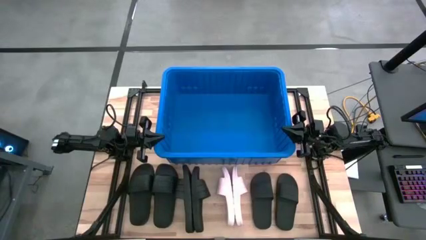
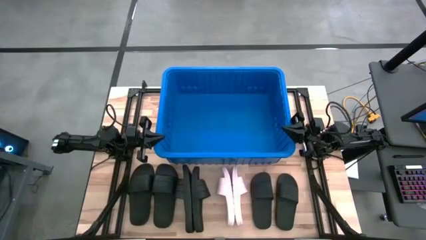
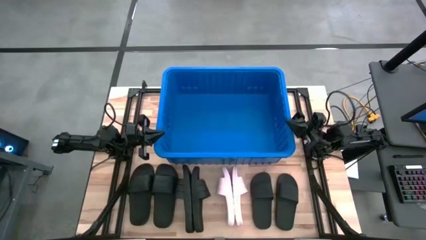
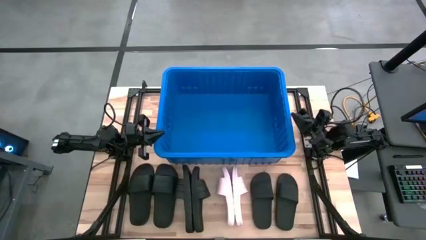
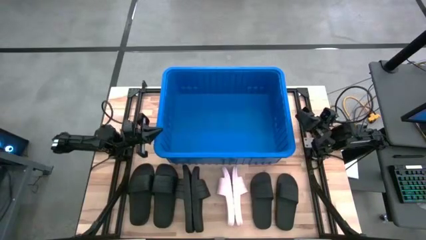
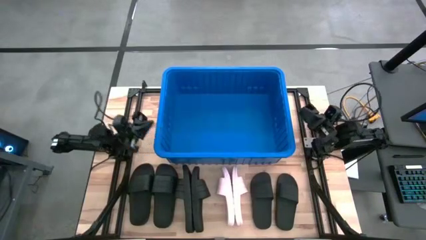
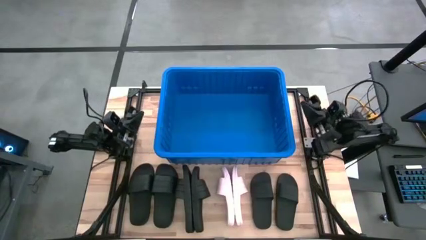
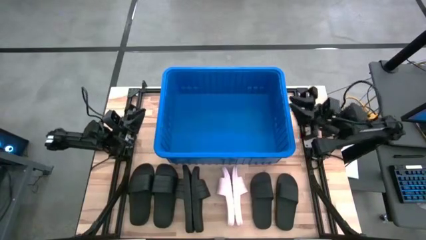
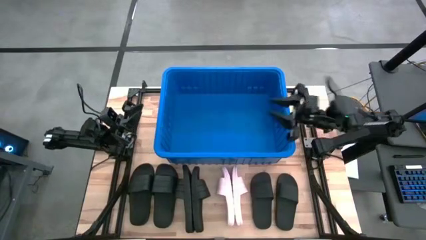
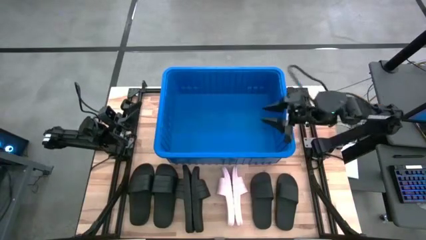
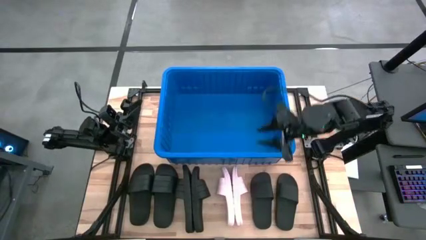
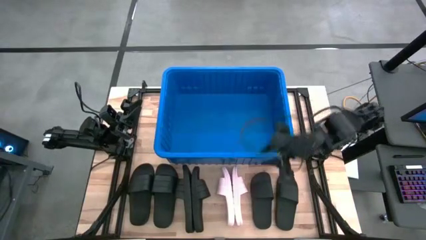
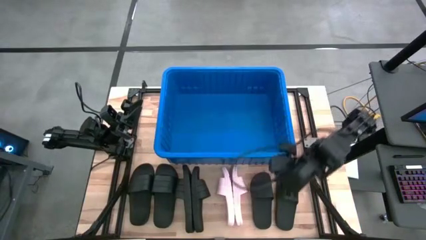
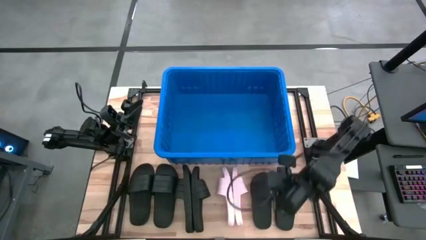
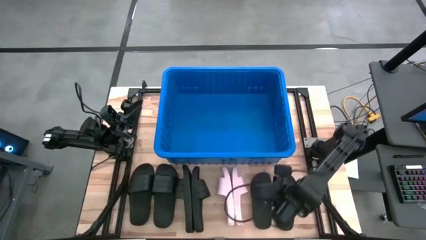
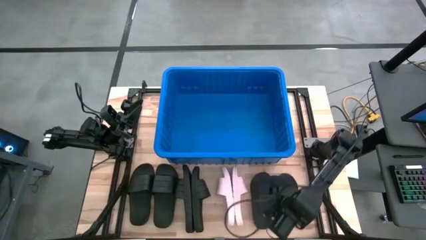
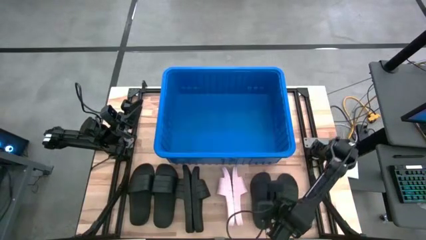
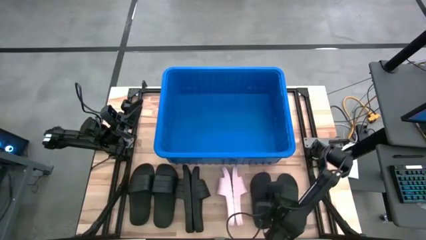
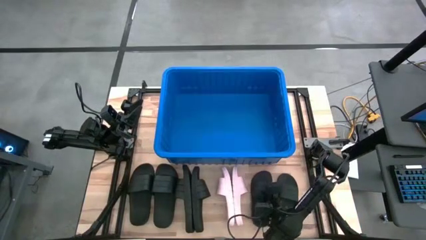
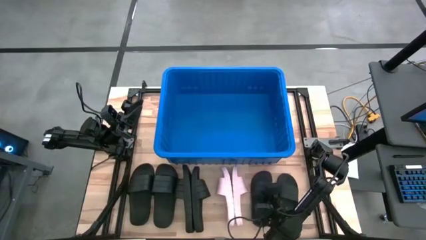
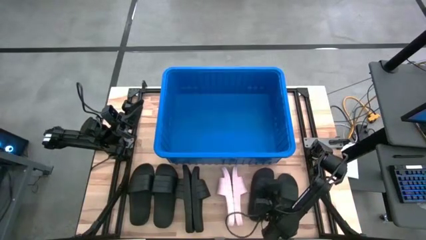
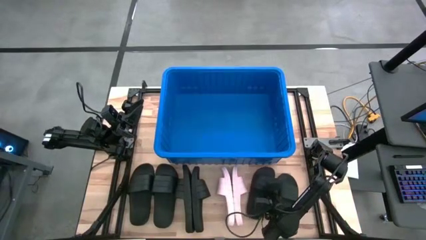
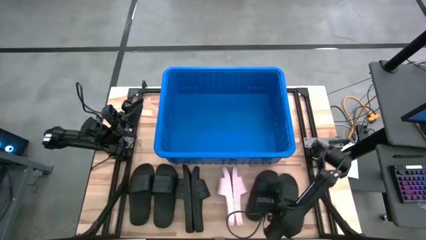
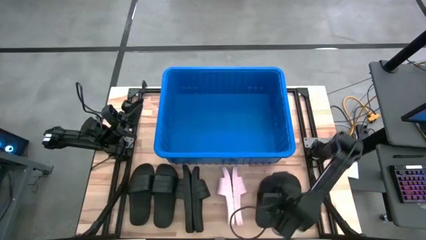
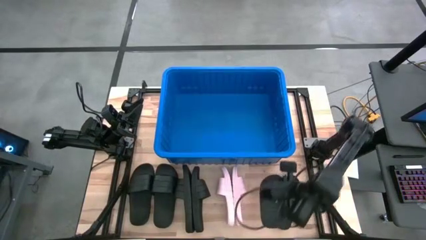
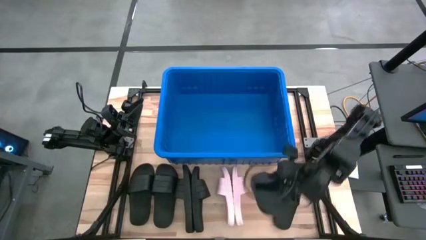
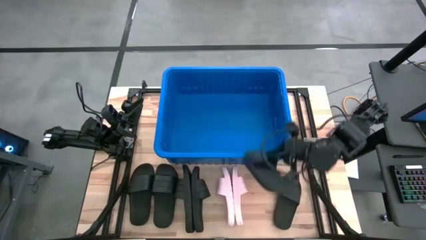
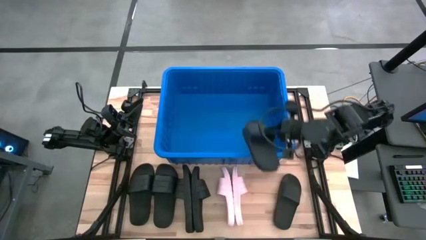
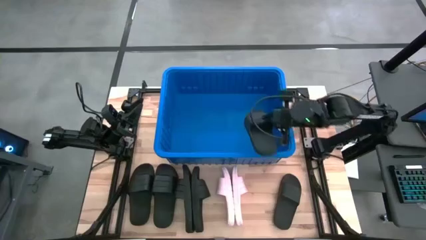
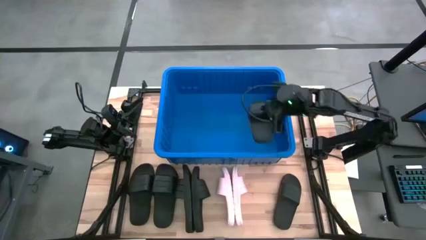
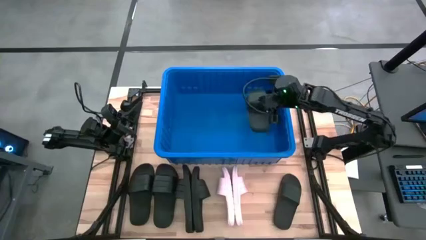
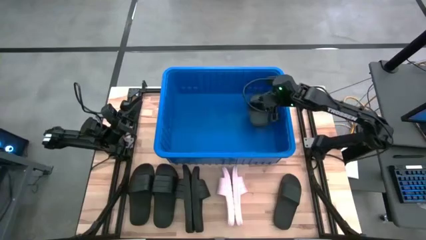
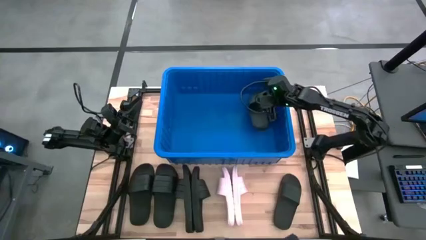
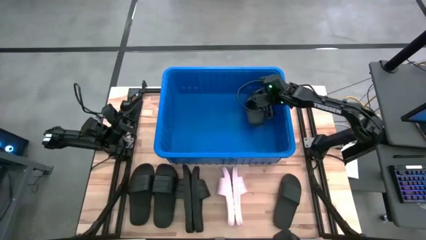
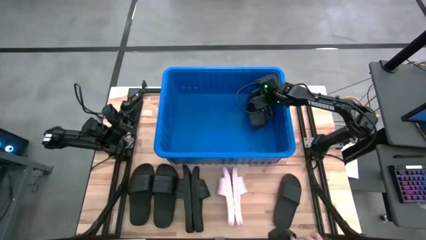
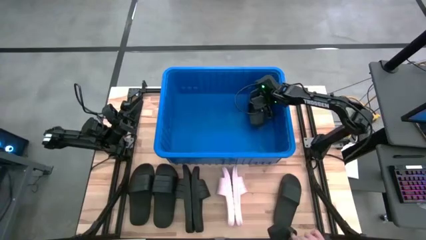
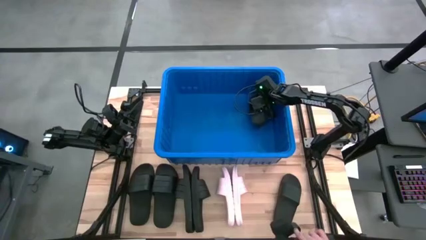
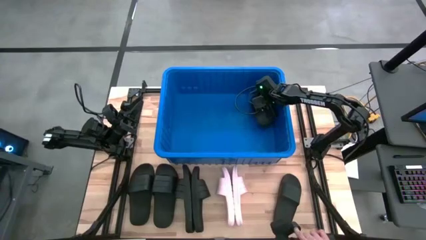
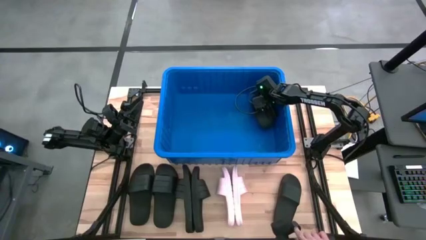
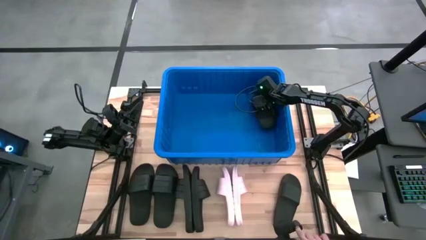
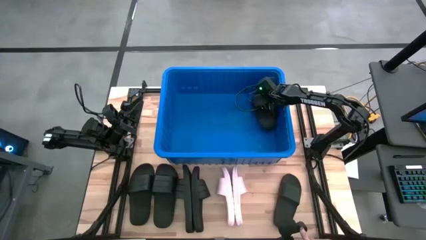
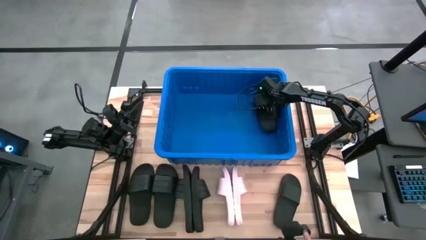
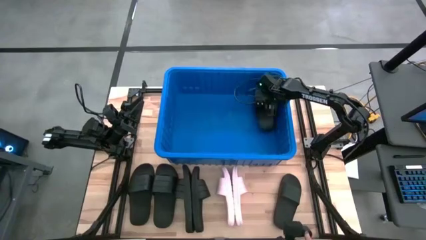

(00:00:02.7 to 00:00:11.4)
Task: Pick and place slides into bin
Put the black slide into the blue bin

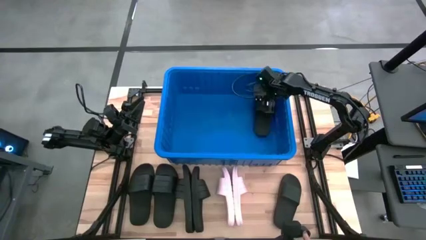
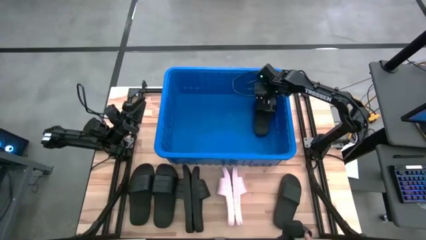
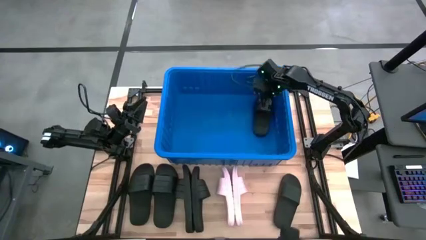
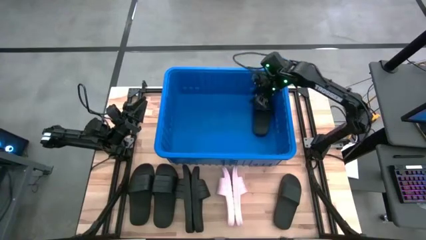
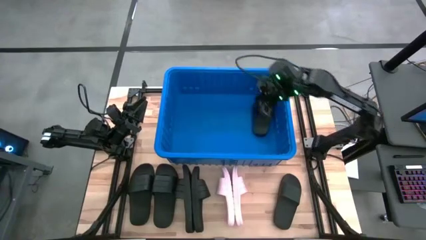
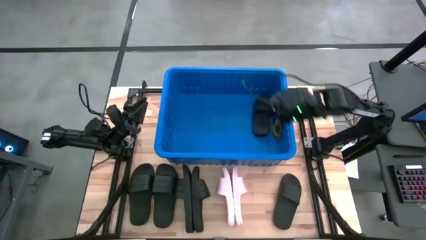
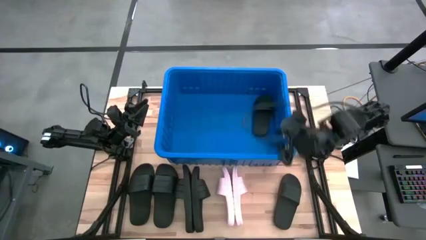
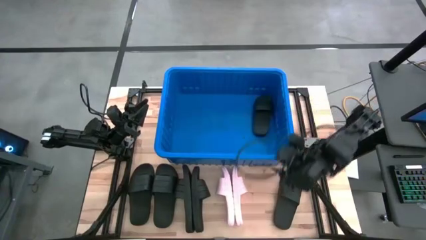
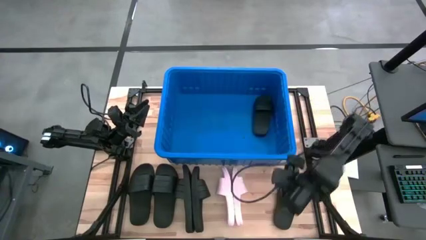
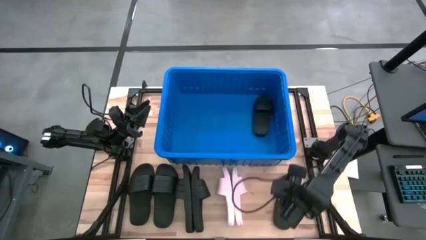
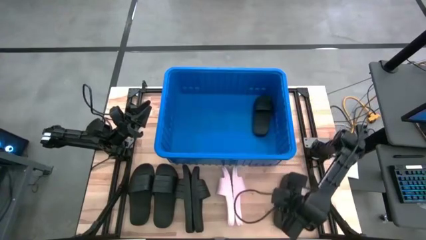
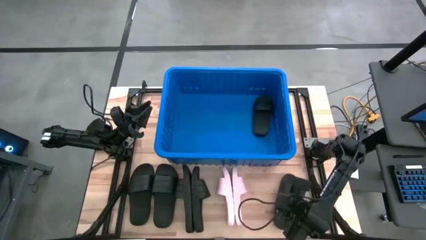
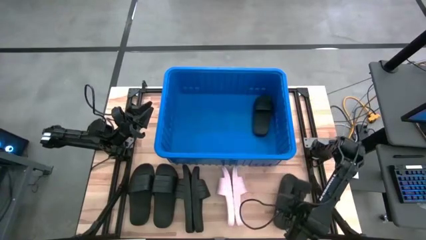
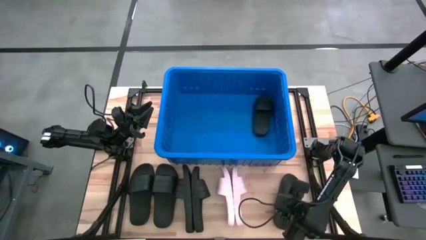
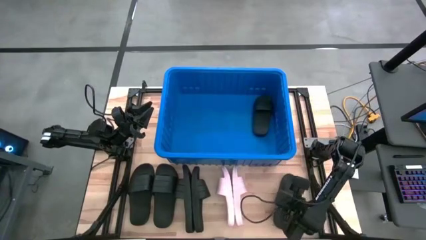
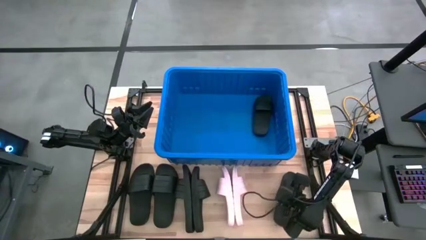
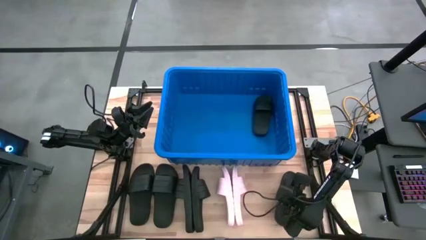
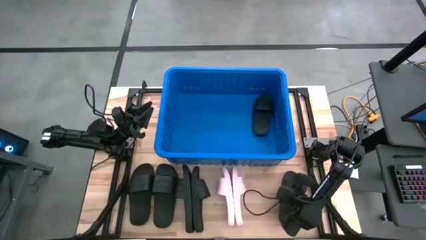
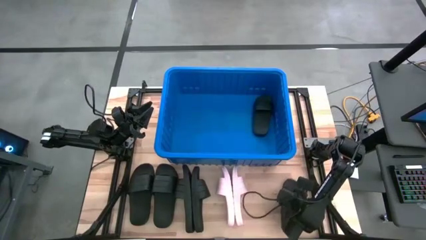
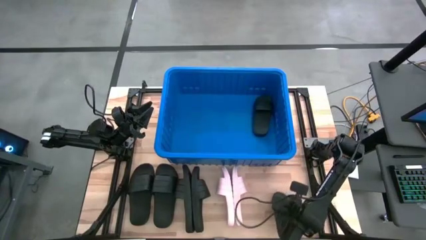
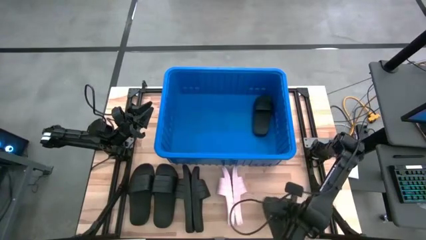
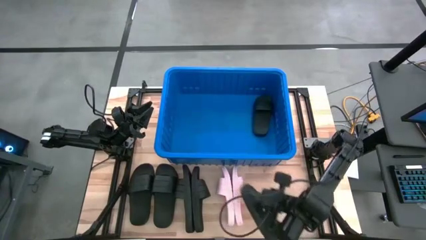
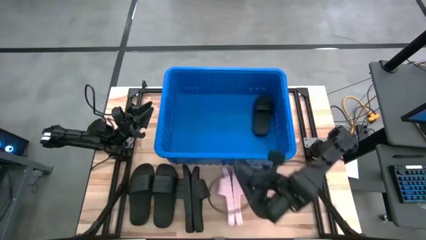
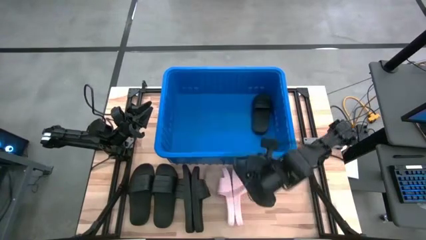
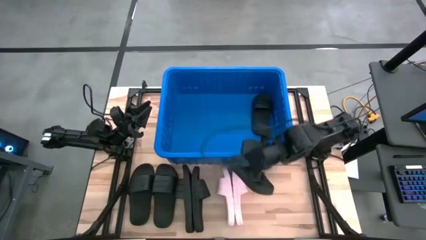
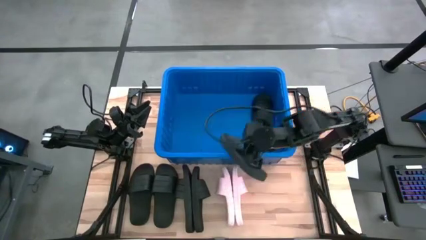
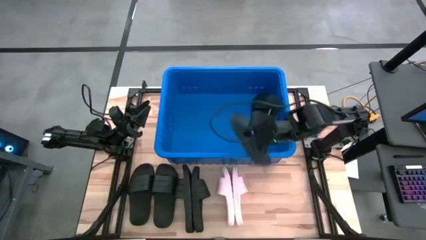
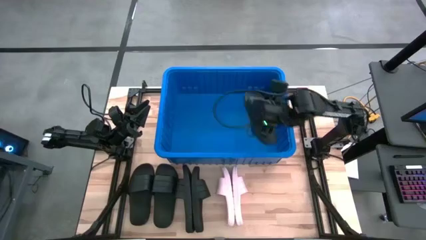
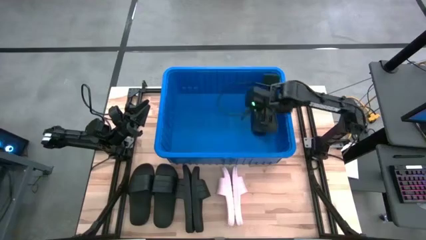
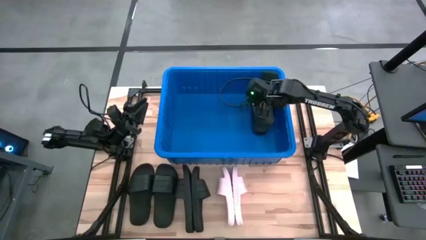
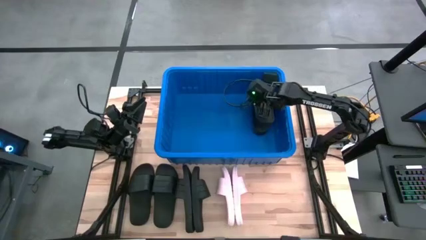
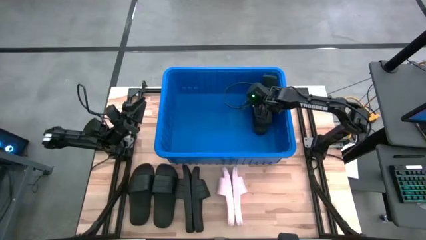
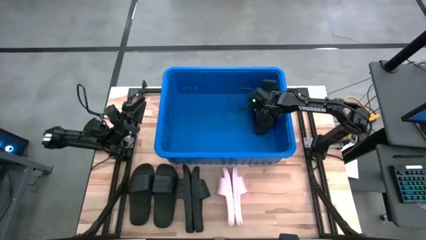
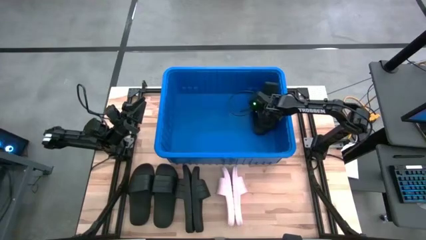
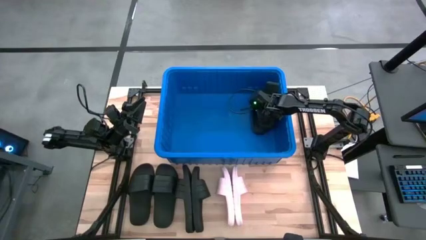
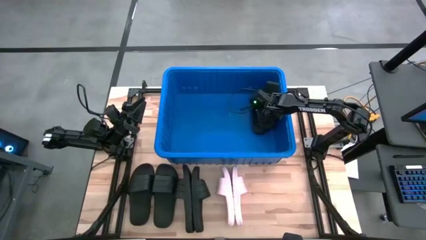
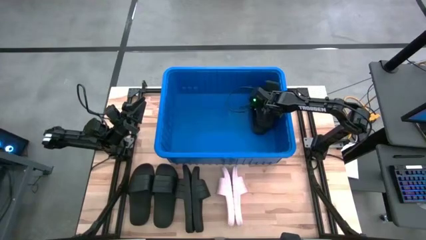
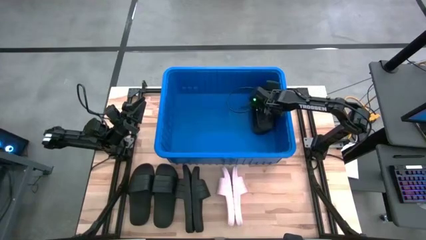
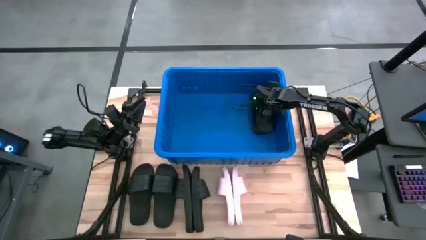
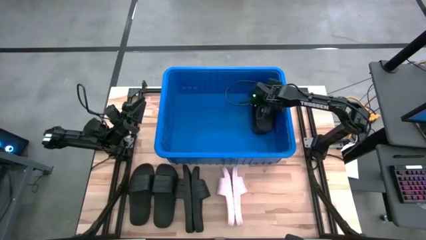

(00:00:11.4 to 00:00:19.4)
Put the black slide into the blue bin
